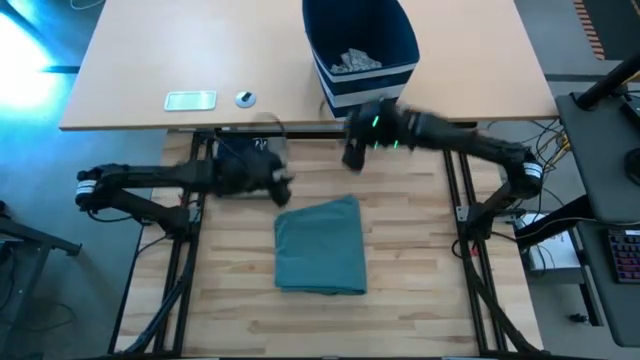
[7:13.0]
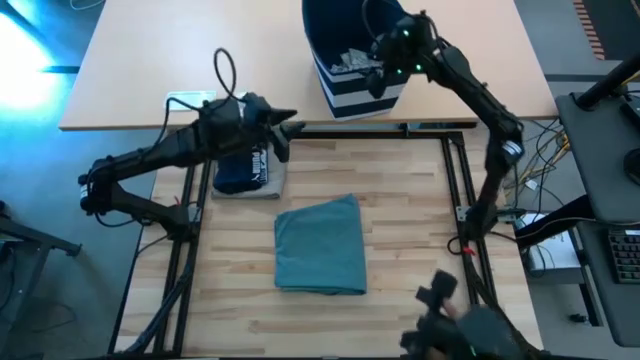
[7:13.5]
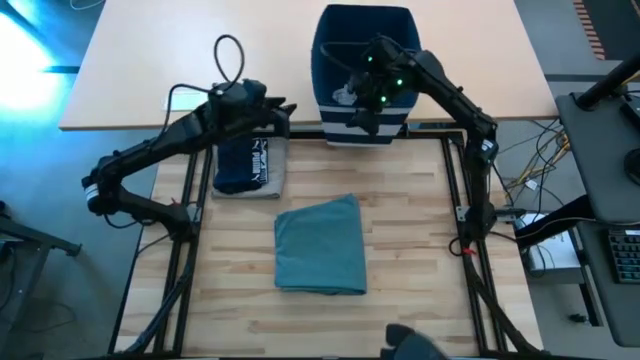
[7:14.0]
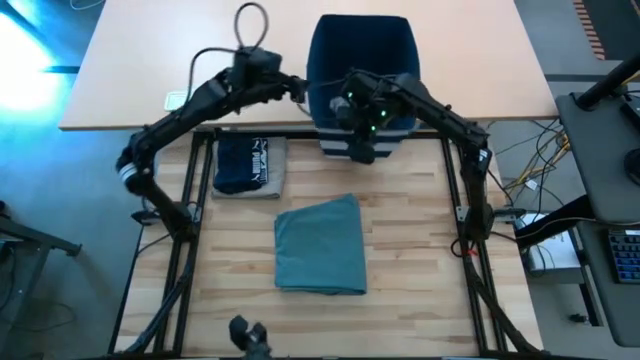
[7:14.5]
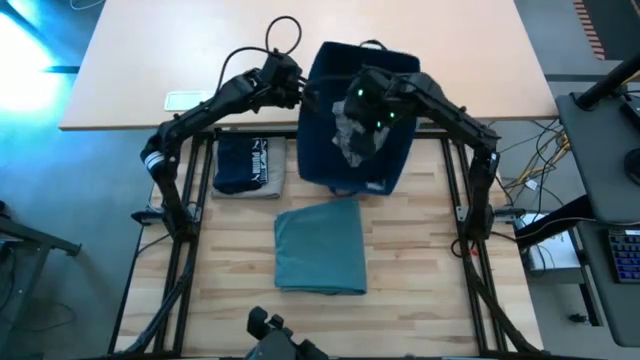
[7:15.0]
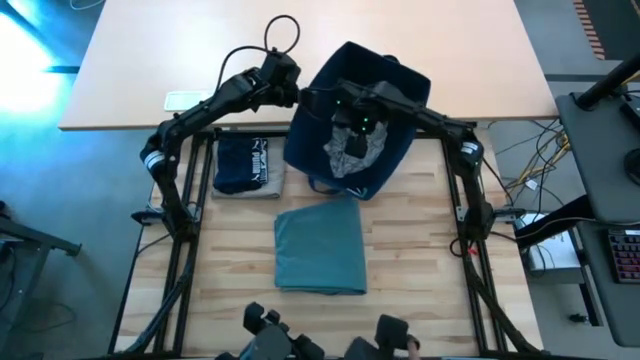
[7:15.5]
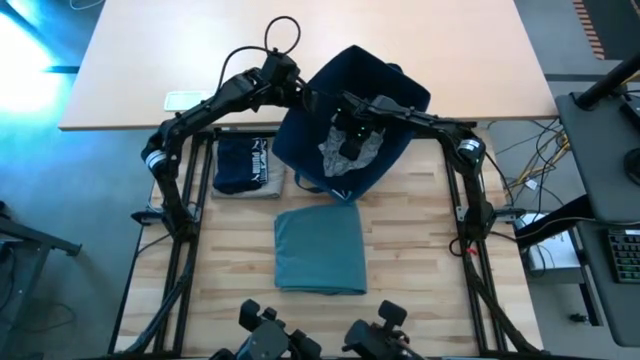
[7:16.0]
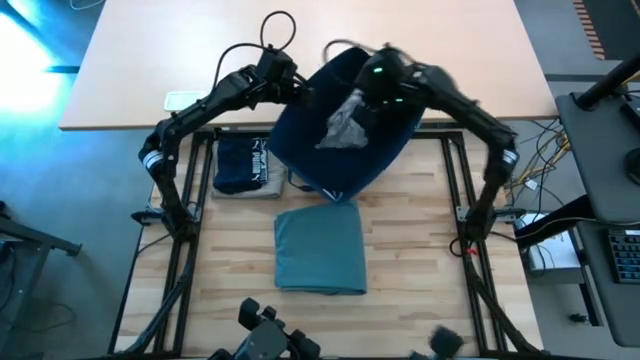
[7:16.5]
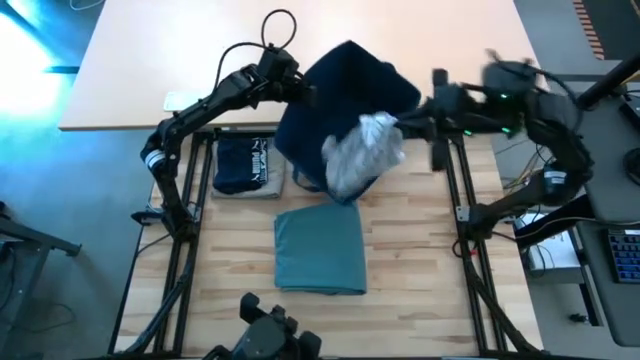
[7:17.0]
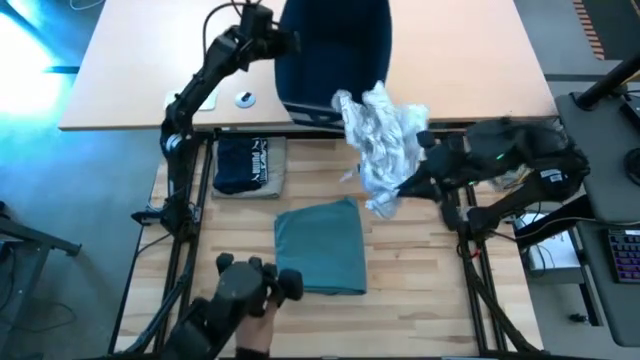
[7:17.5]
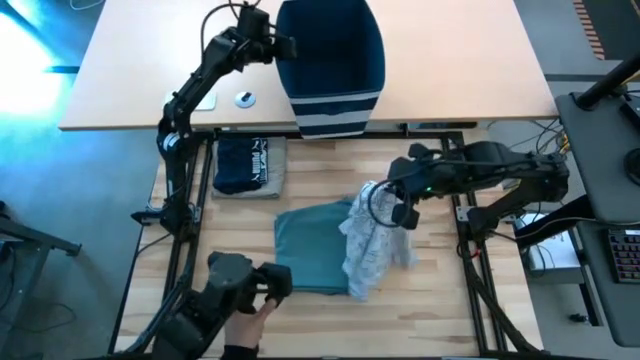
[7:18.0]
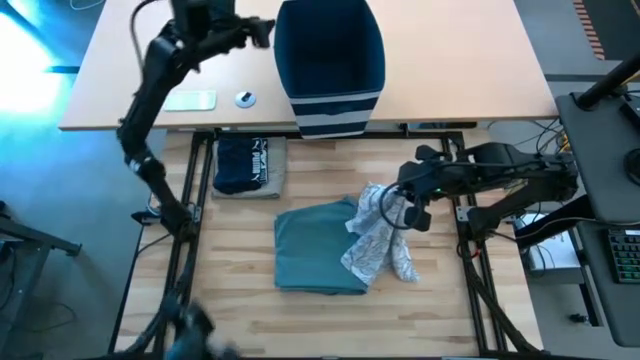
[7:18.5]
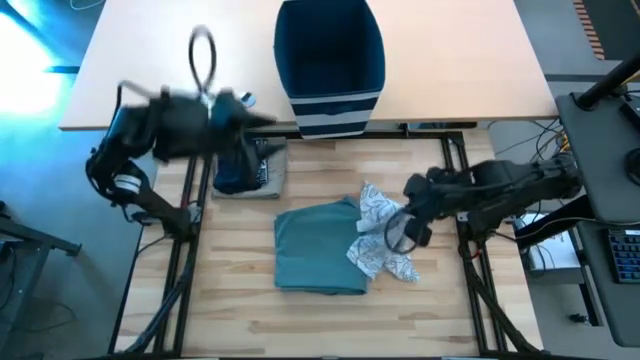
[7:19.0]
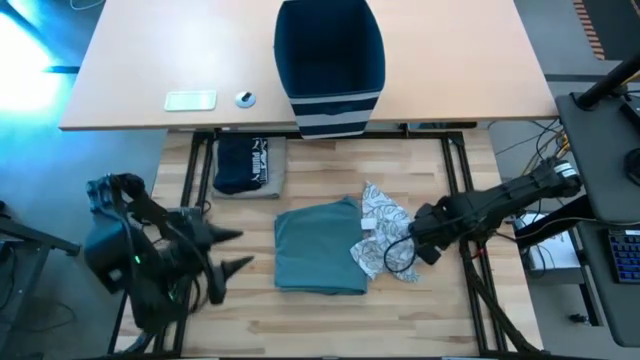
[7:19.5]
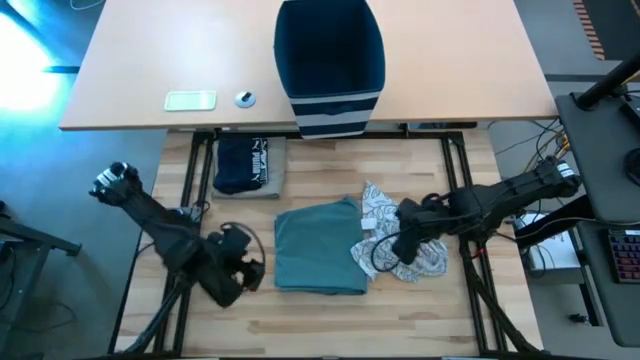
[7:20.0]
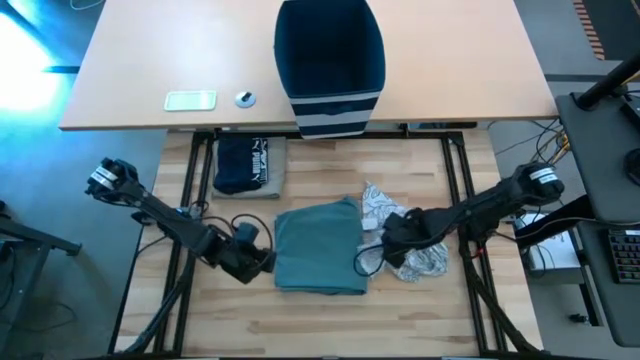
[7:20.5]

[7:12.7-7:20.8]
Task: Fold Laundry from Bin
Remove the white shirt from the laundry bin

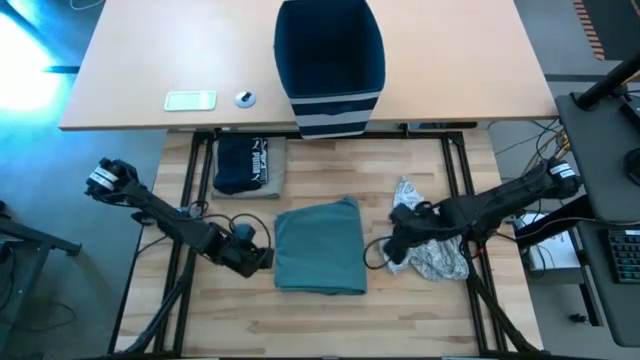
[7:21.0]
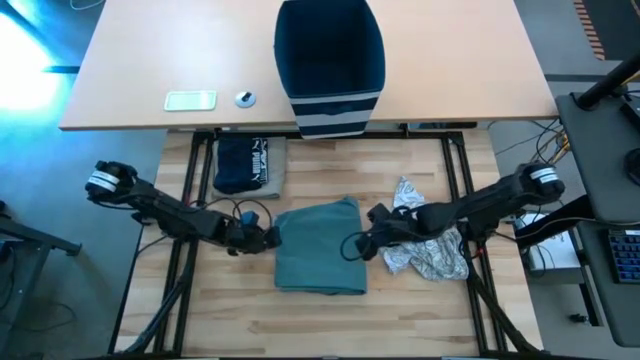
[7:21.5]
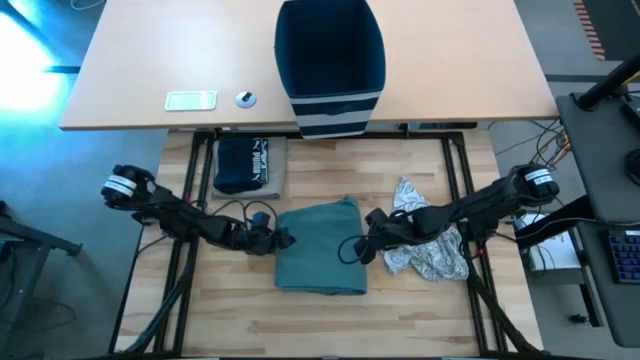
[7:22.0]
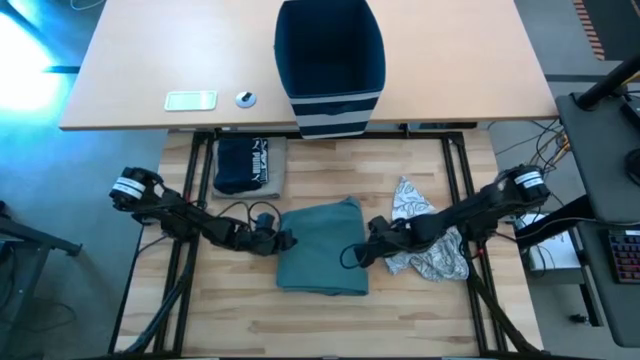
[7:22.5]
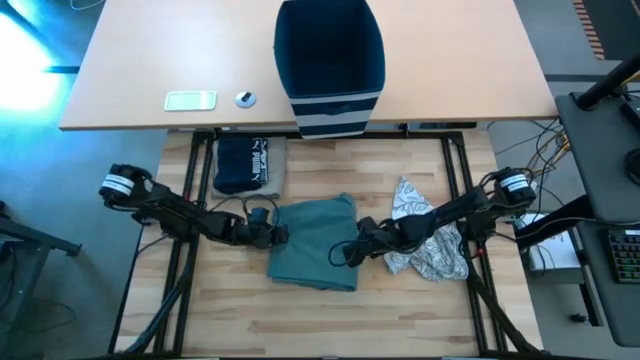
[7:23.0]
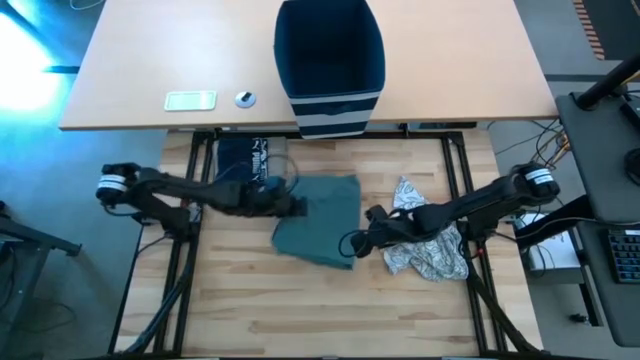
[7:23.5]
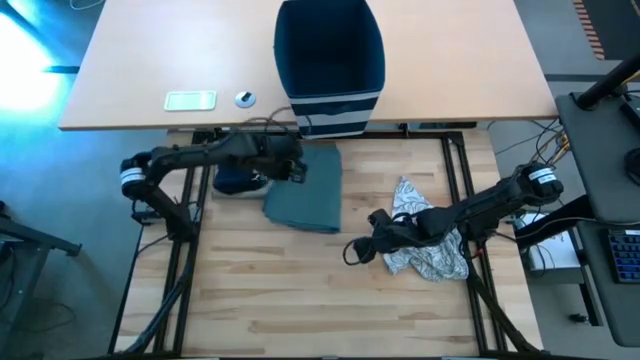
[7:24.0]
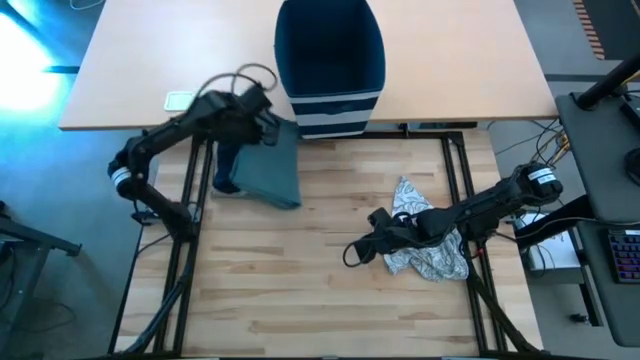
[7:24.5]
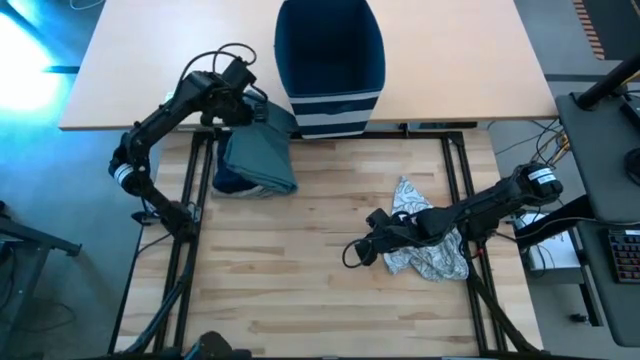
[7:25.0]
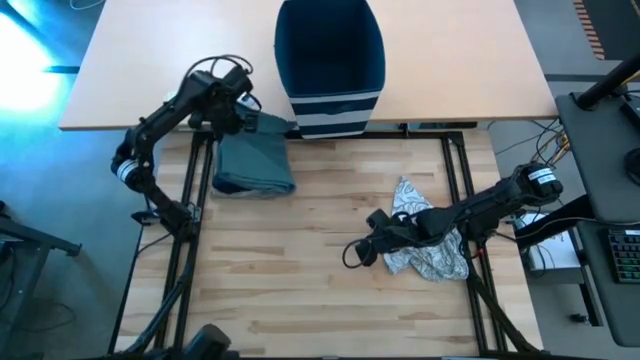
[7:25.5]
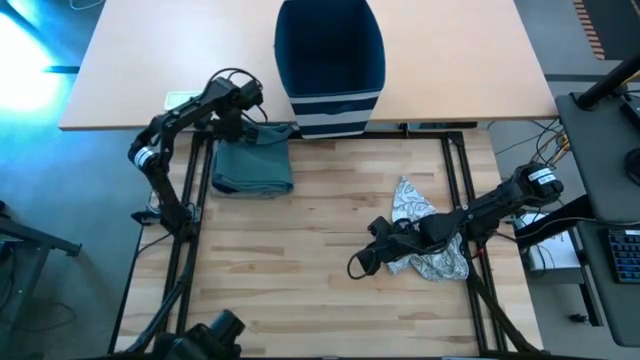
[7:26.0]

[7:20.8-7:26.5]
Stack the folded gray pants on the folded black underwear

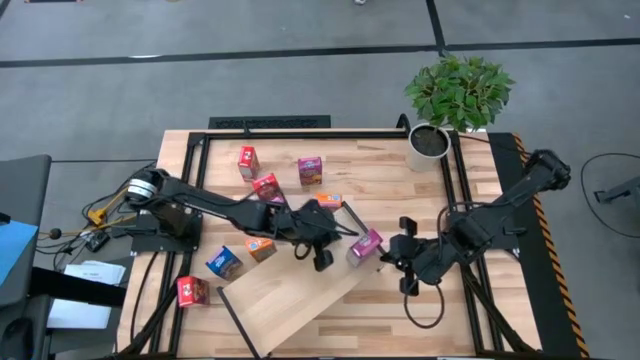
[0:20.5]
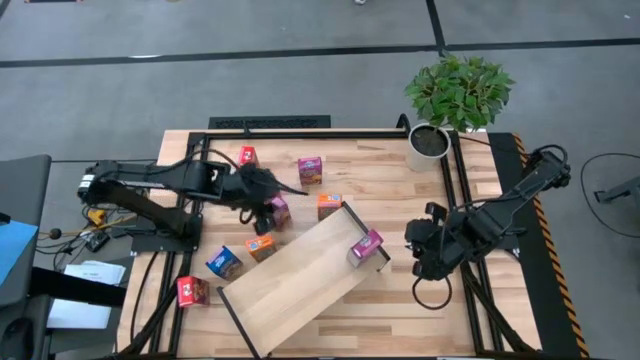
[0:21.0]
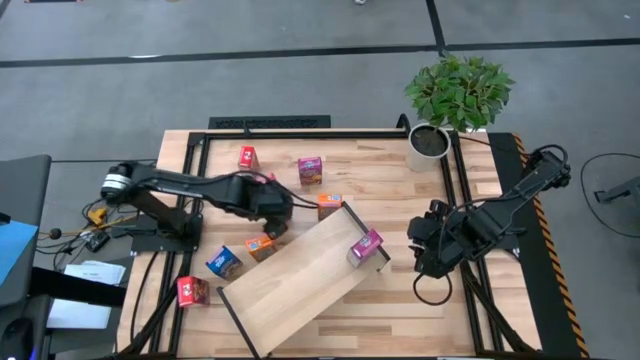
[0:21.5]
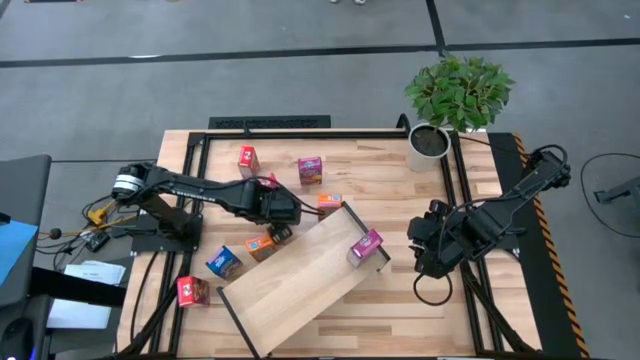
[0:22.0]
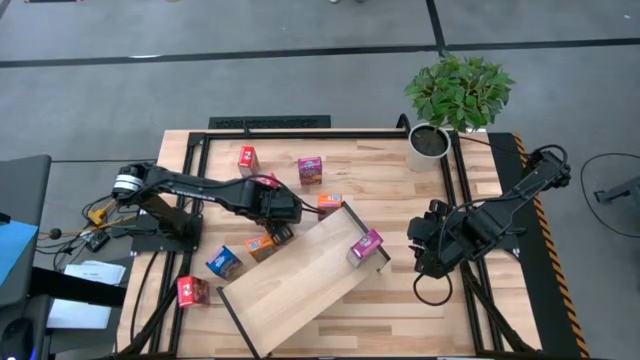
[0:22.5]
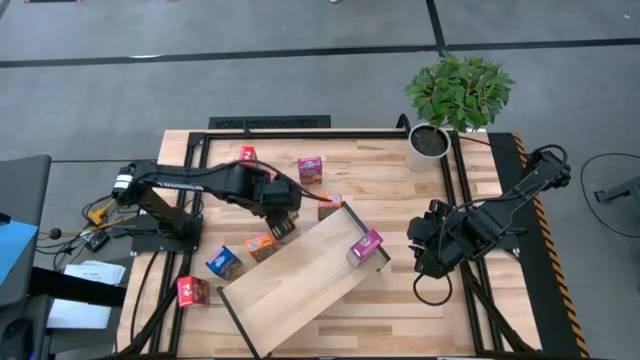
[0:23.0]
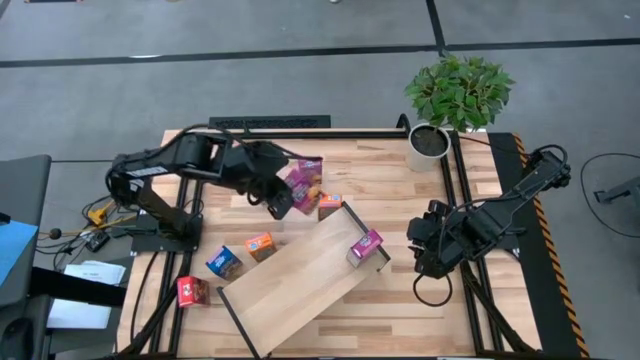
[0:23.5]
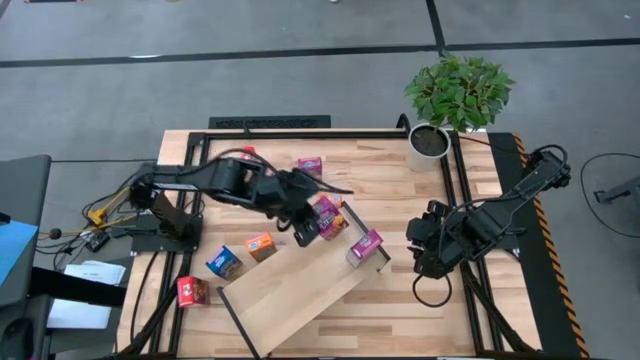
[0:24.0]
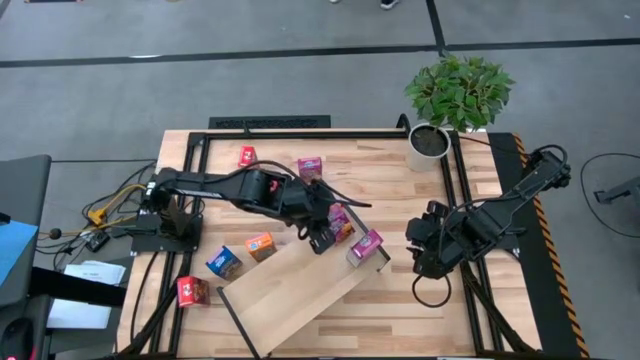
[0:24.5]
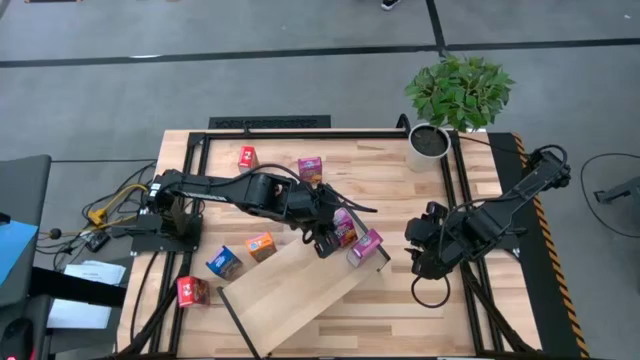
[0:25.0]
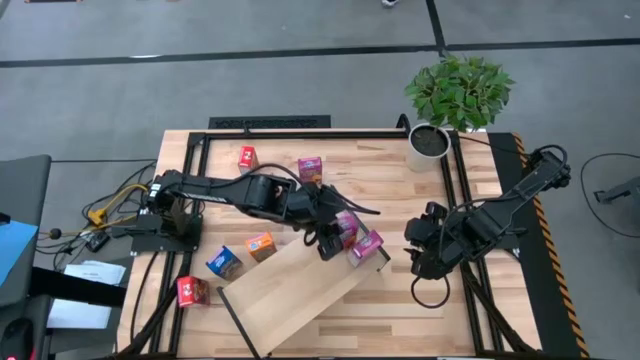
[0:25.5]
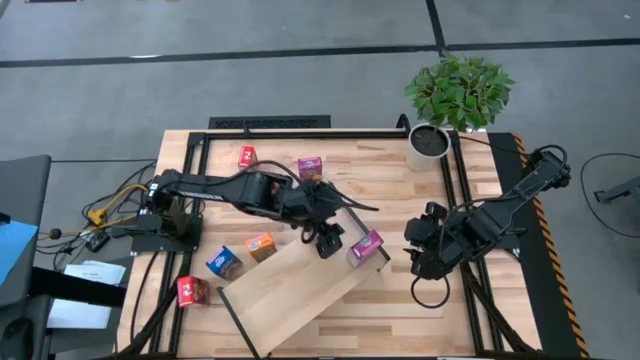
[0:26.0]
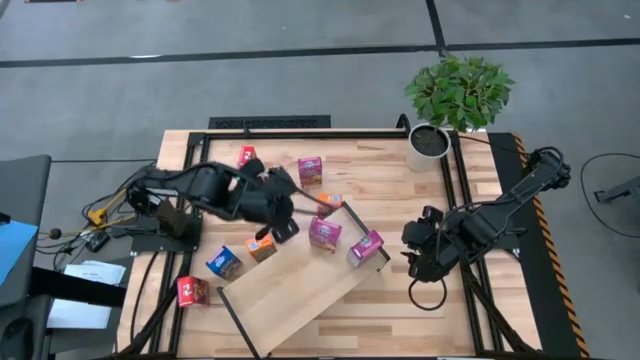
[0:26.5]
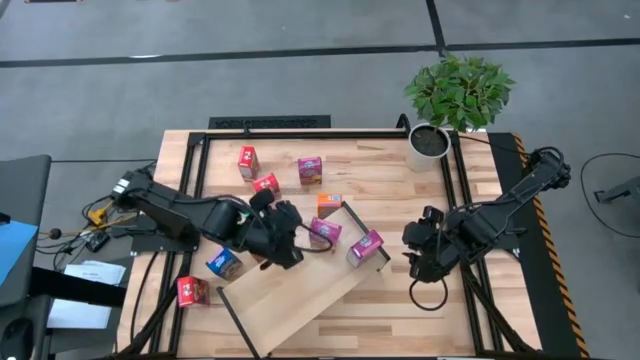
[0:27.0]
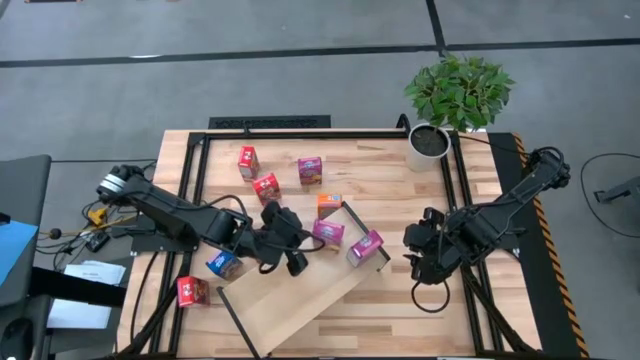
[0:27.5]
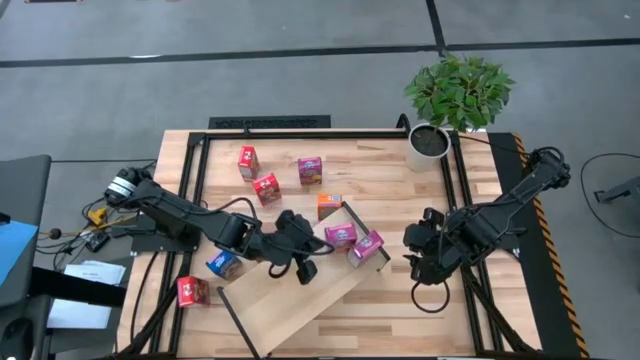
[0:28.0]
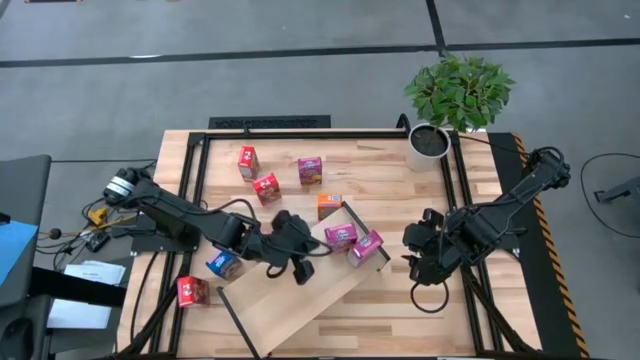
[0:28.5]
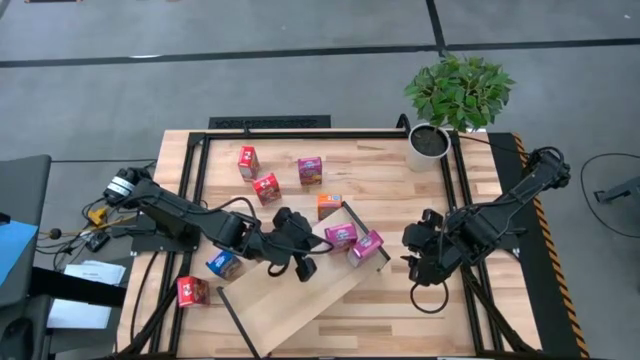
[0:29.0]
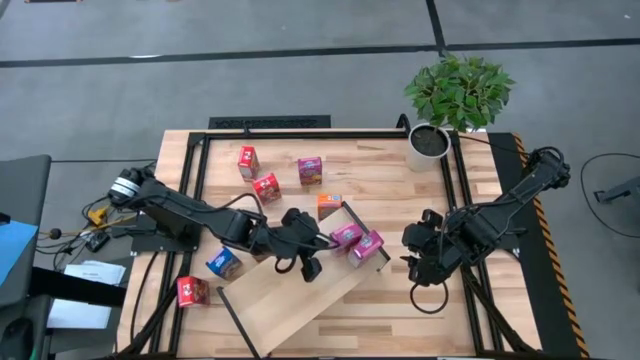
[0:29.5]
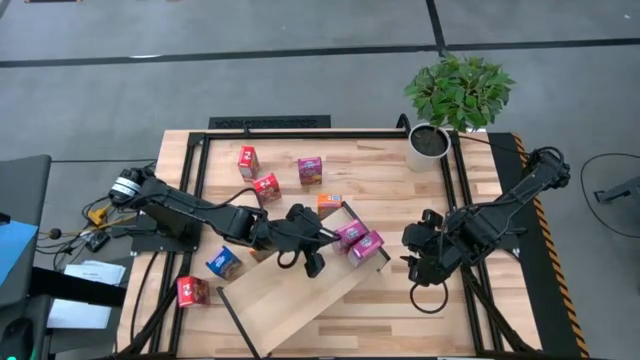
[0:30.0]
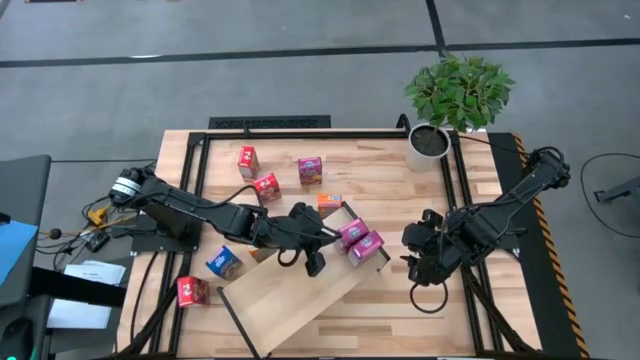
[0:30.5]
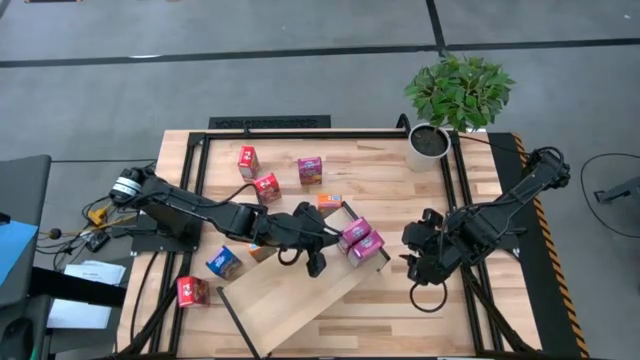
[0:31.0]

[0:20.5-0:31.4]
Task: Stack cereal on shelf
Put the bottom purple cereal box onto the shelf
